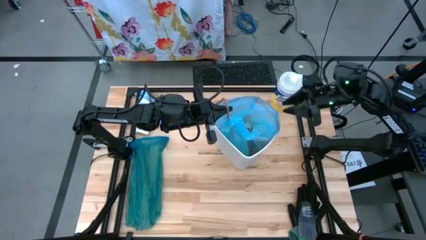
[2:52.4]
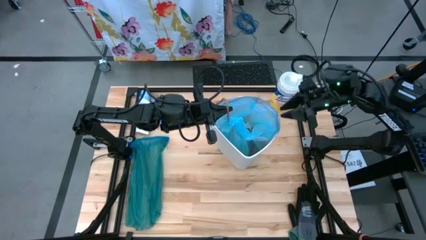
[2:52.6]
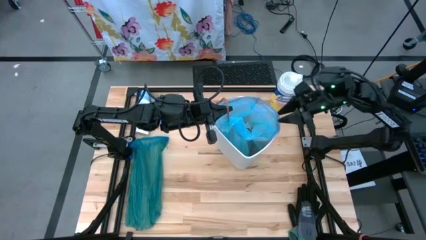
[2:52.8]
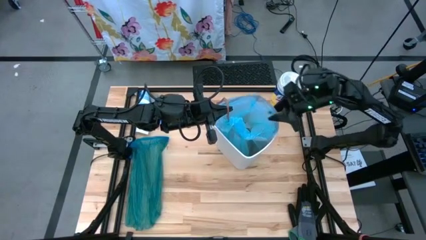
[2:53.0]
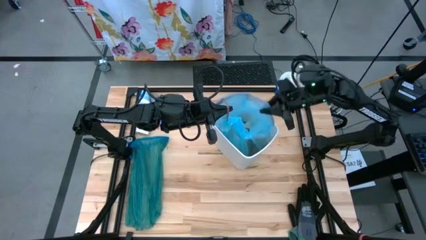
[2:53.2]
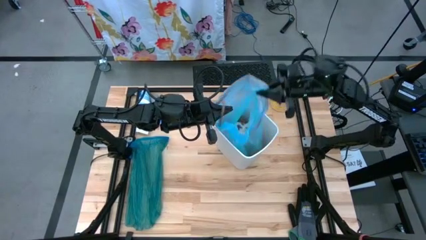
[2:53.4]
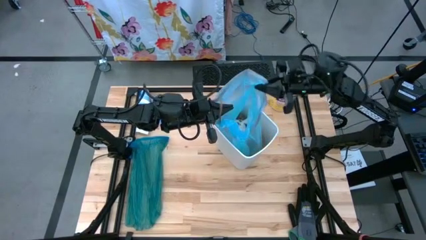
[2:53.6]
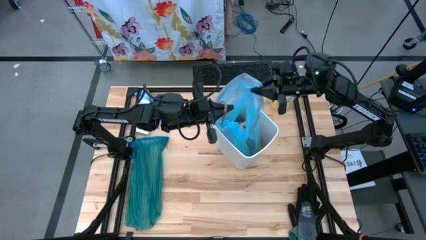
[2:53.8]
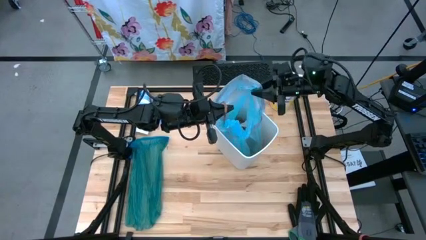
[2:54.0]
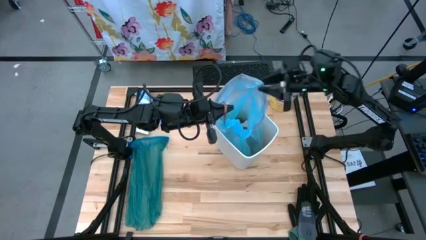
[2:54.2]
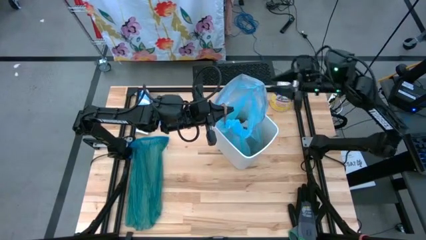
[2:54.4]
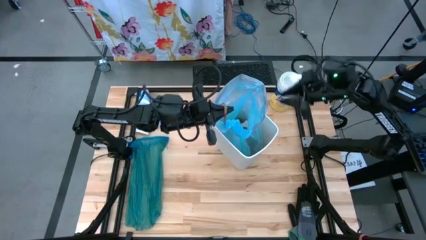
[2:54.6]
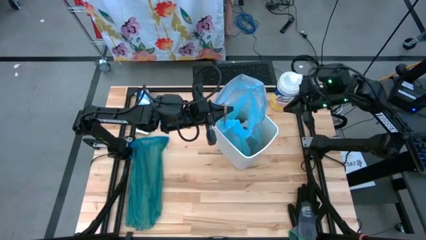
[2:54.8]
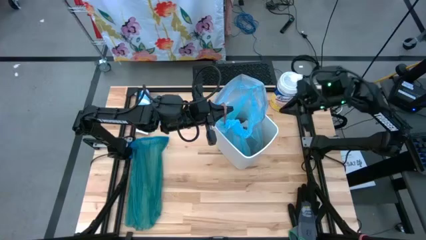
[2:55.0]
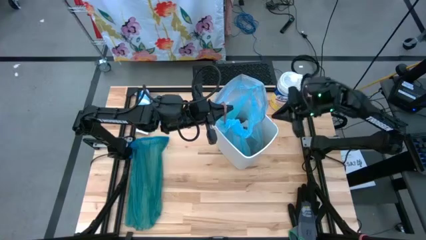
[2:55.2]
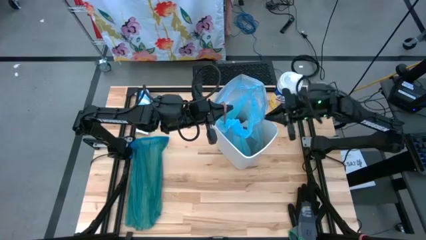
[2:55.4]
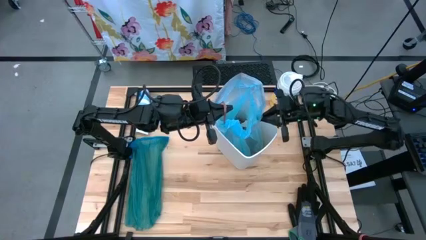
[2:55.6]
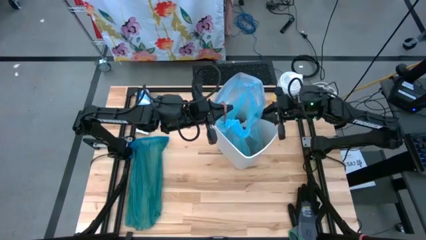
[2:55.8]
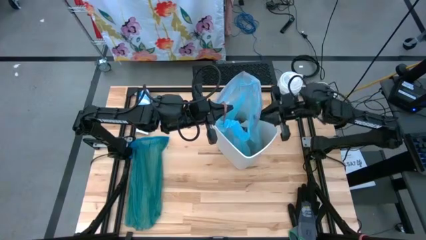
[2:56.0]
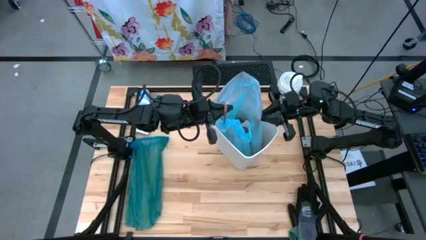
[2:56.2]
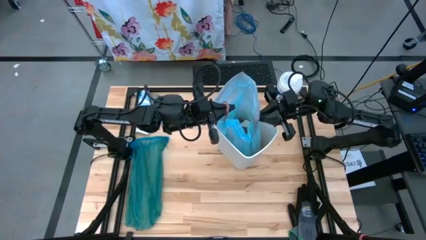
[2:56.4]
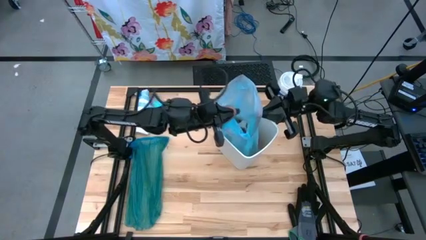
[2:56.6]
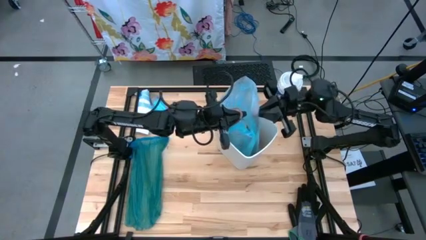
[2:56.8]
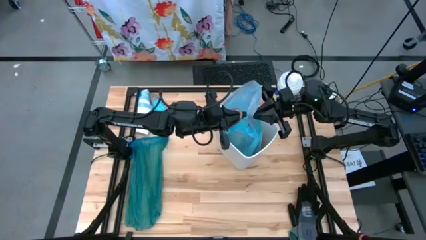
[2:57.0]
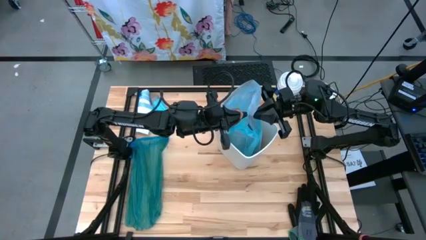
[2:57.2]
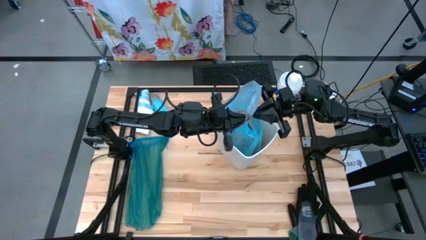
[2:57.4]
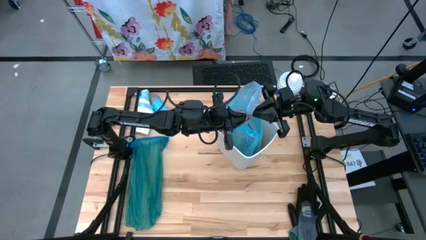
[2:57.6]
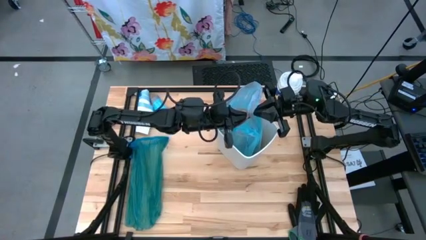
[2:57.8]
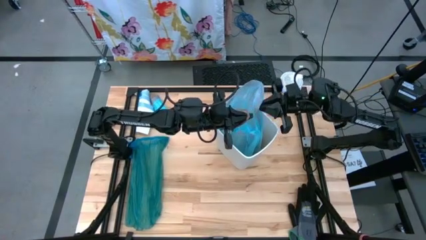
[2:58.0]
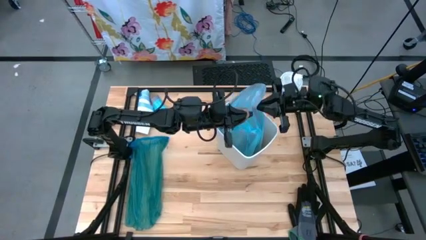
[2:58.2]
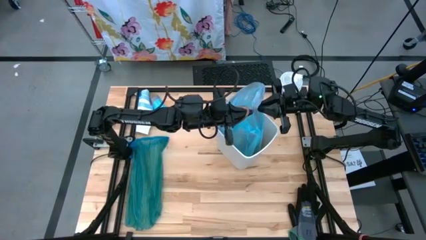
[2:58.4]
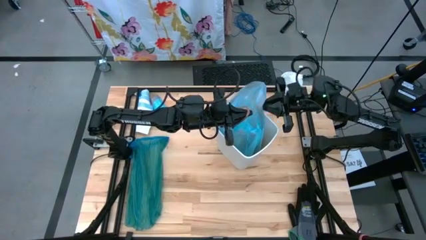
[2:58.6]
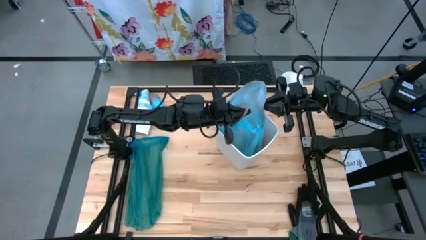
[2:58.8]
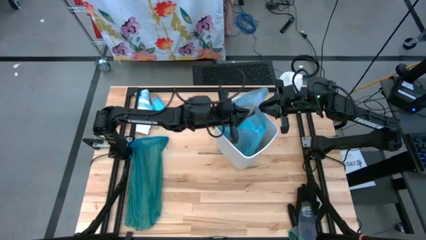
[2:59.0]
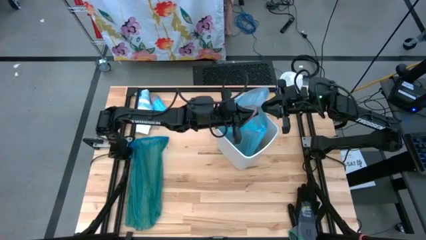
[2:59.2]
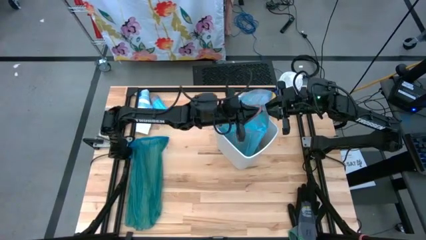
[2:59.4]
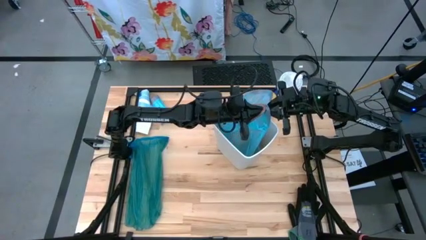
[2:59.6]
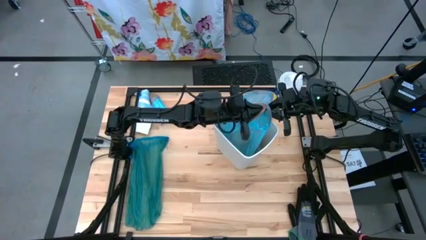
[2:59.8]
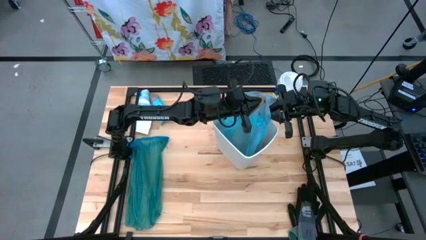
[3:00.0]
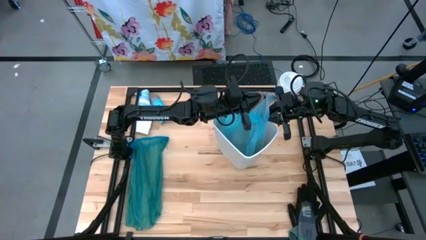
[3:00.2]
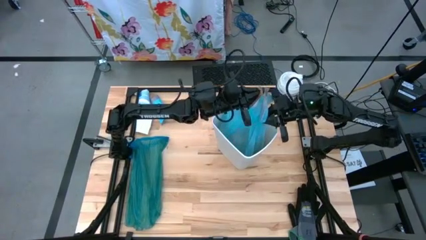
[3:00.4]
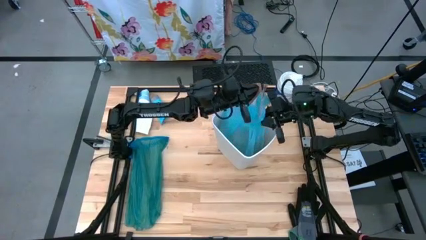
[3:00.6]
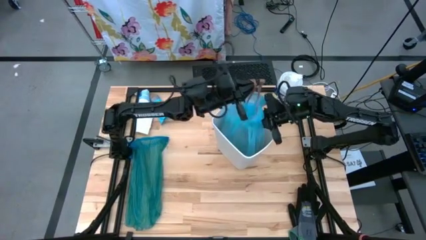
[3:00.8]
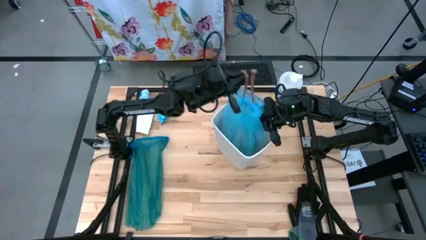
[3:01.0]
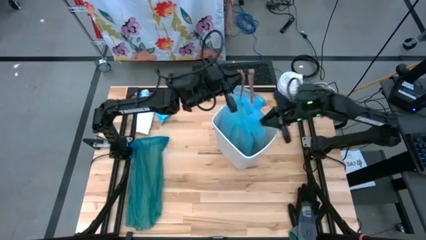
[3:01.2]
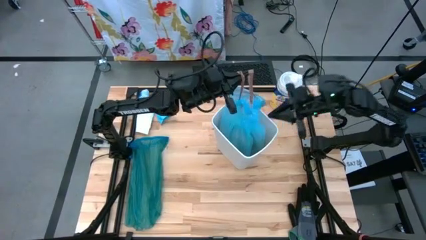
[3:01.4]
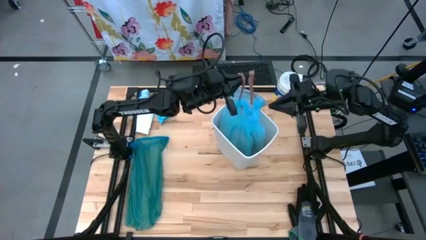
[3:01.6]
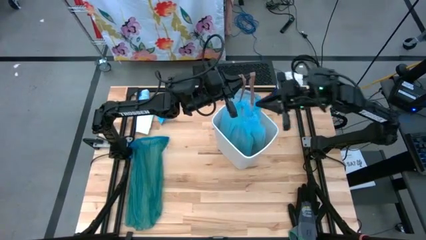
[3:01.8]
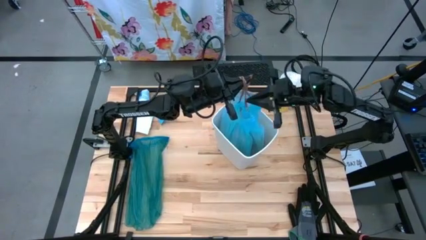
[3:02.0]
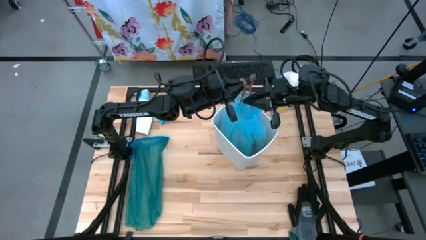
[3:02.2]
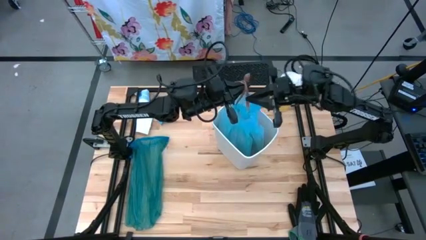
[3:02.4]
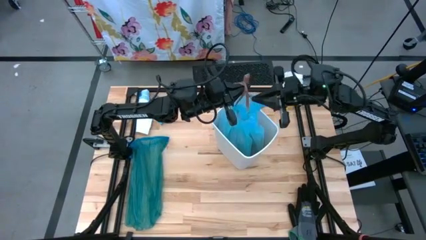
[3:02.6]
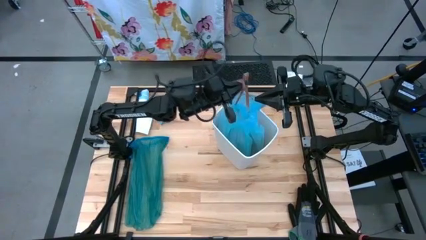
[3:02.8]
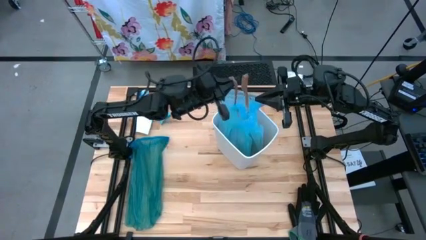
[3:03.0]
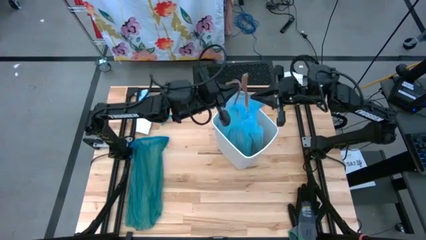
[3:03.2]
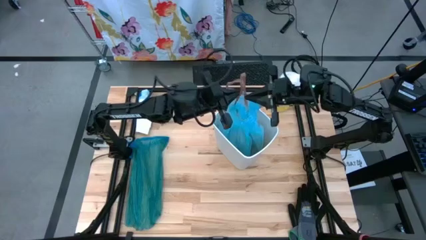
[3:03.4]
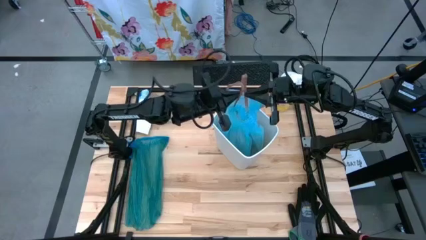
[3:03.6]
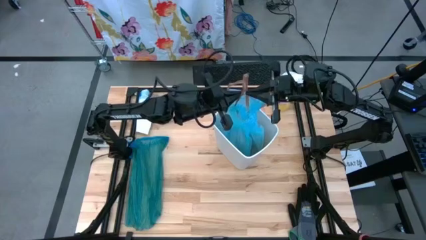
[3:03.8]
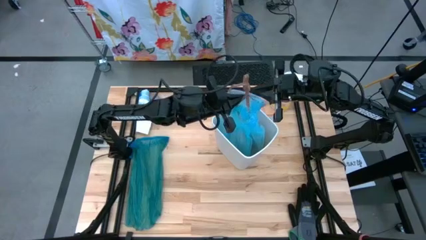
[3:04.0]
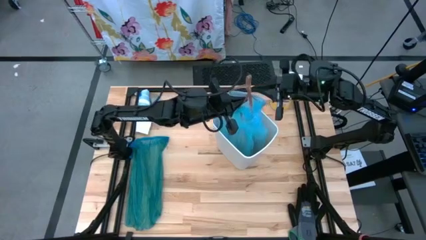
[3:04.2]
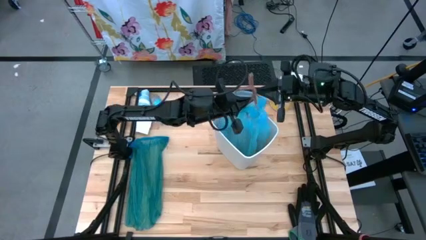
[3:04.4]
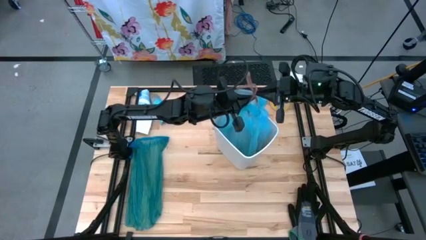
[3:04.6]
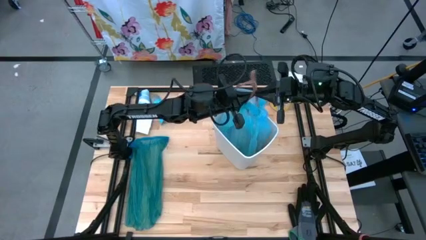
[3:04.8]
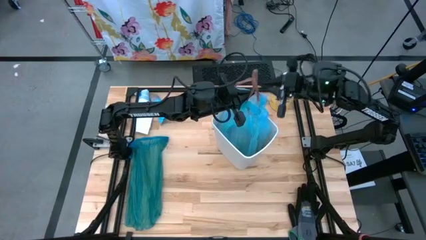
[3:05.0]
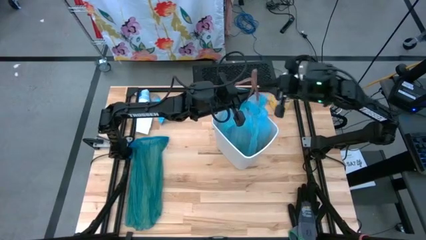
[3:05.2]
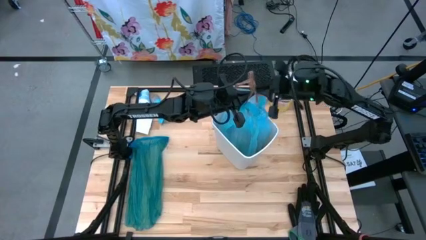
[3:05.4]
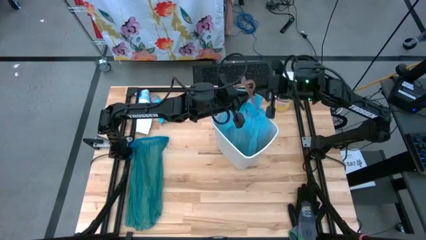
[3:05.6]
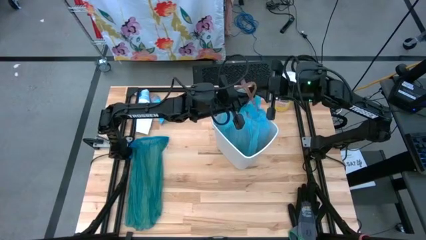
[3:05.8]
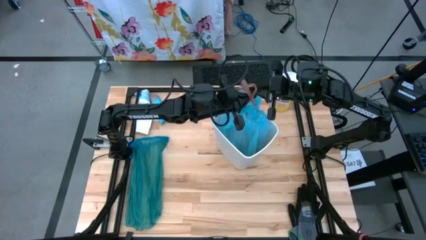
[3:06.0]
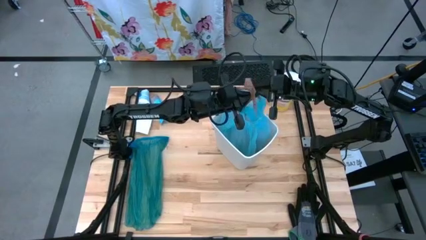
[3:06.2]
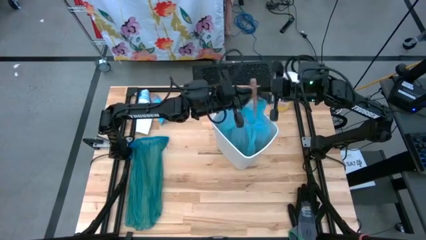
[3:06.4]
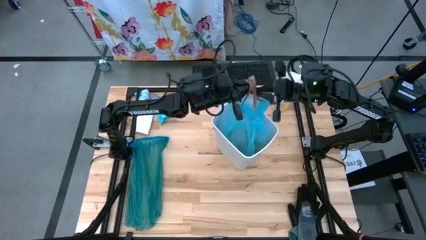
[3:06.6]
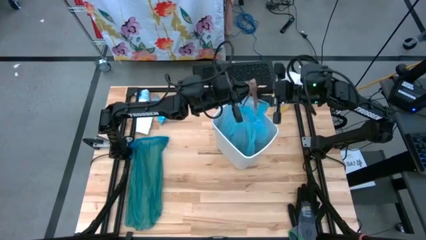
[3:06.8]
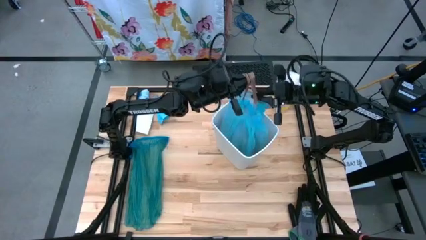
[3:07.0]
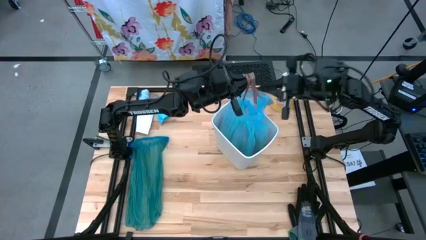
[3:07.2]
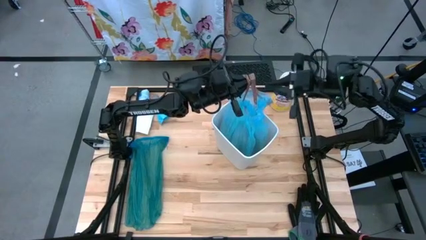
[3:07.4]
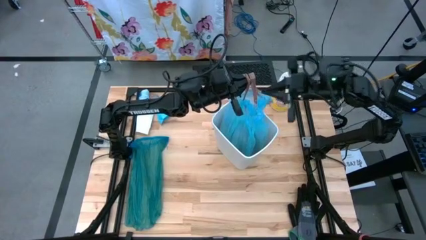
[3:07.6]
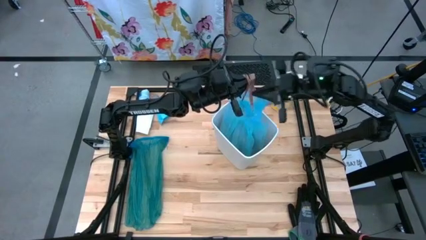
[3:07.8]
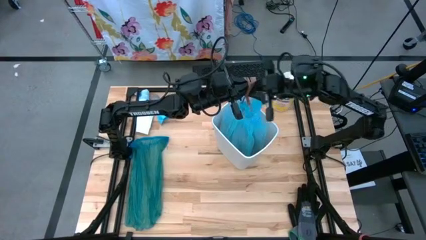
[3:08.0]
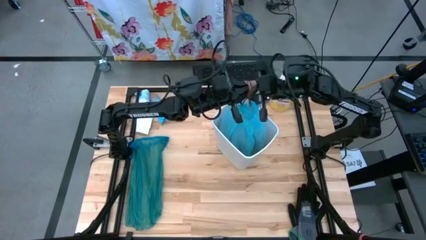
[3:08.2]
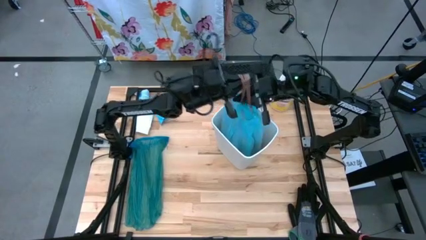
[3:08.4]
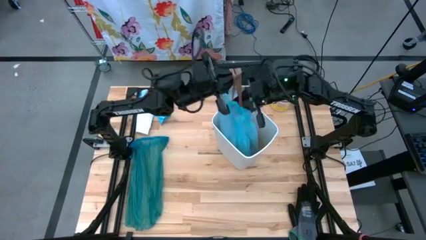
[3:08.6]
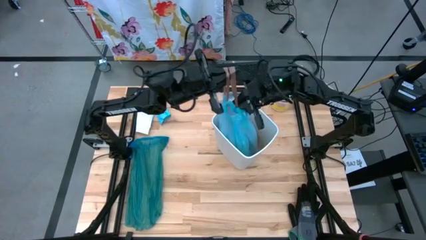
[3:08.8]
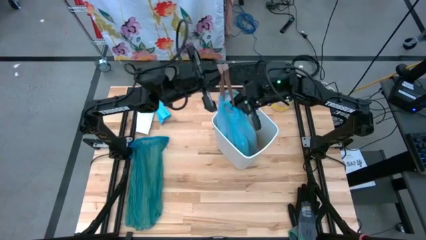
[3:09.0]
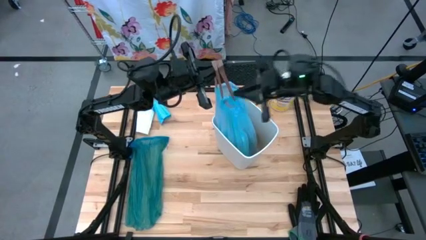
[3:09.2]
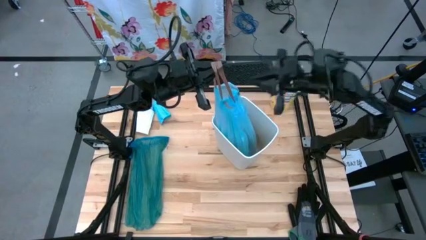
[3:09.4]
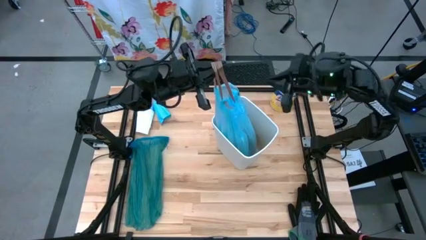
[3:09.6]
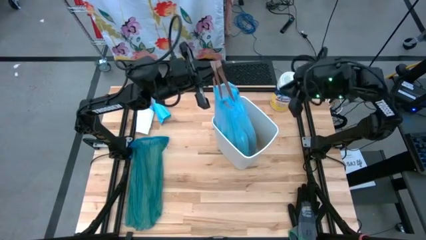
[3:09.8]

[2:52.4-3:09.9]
Task: place trash/remove bag and relplace
Close the blue trash bag
